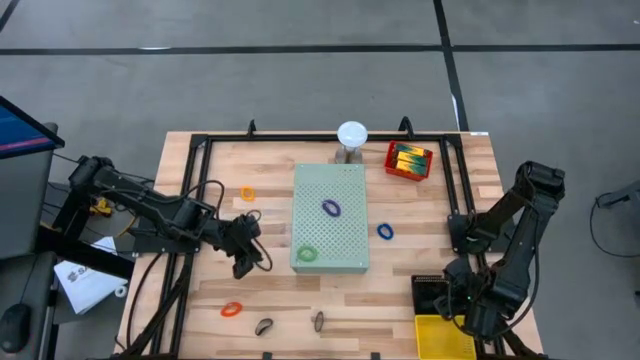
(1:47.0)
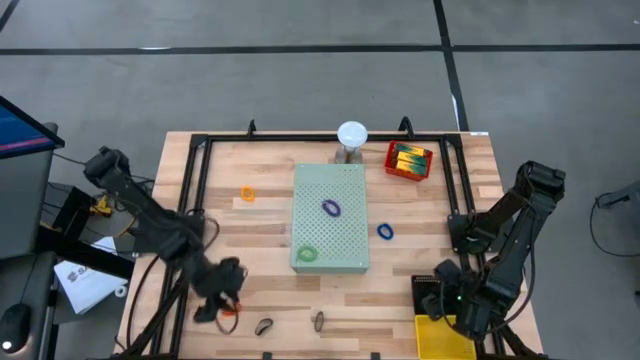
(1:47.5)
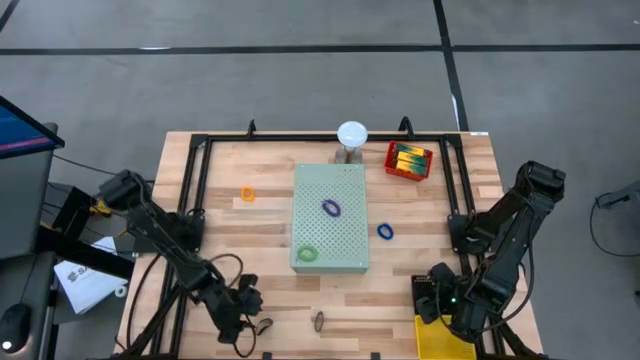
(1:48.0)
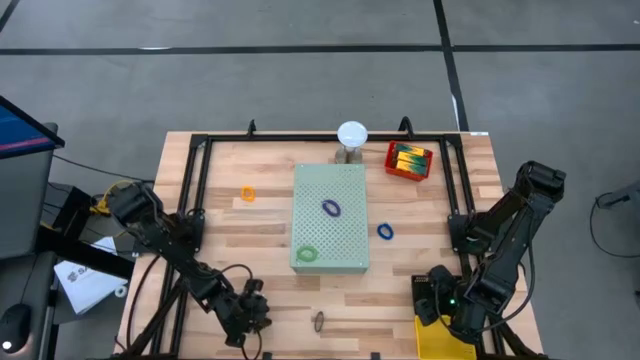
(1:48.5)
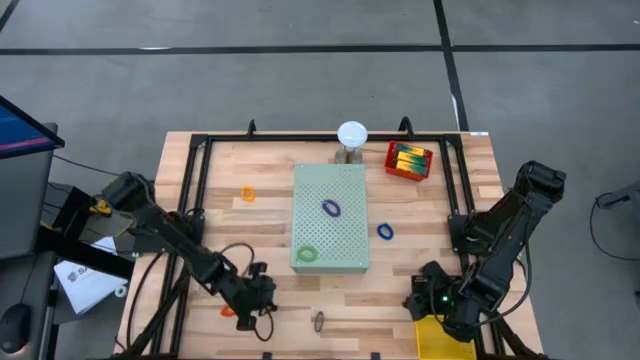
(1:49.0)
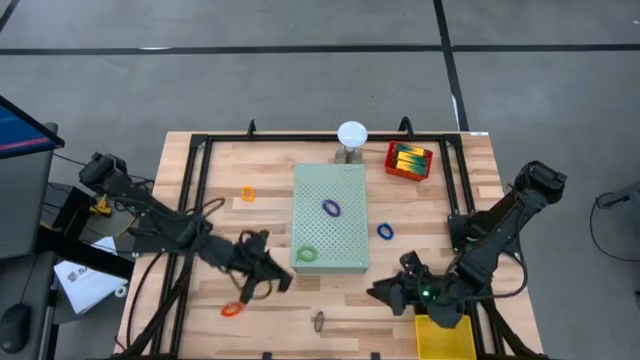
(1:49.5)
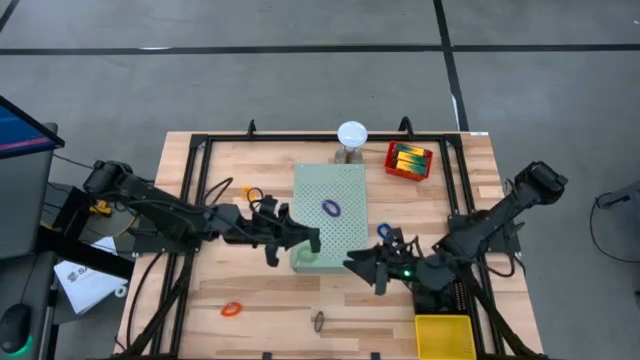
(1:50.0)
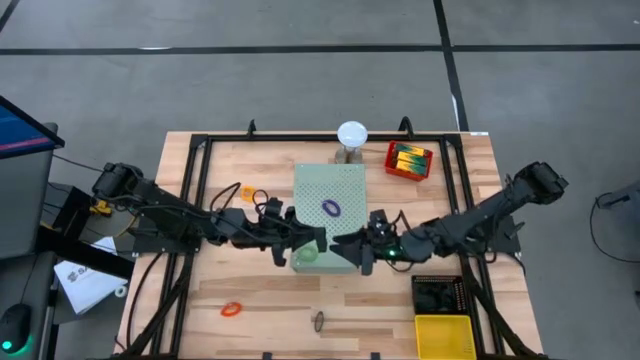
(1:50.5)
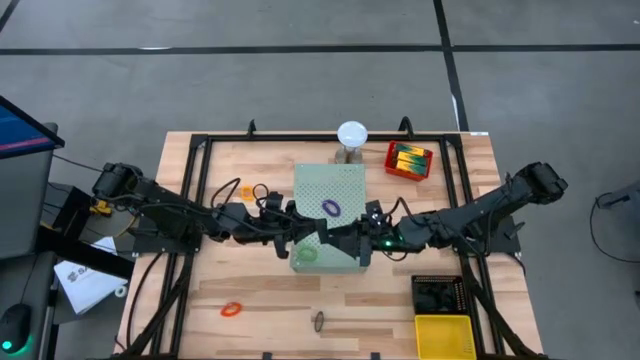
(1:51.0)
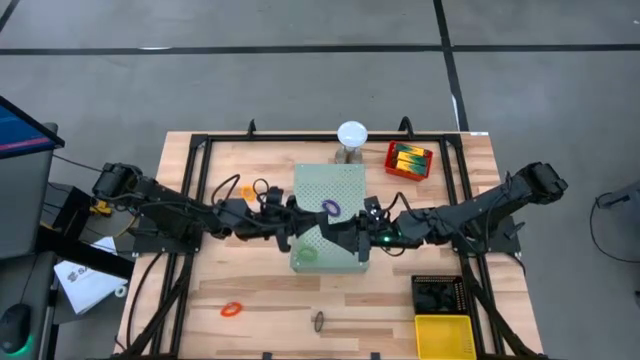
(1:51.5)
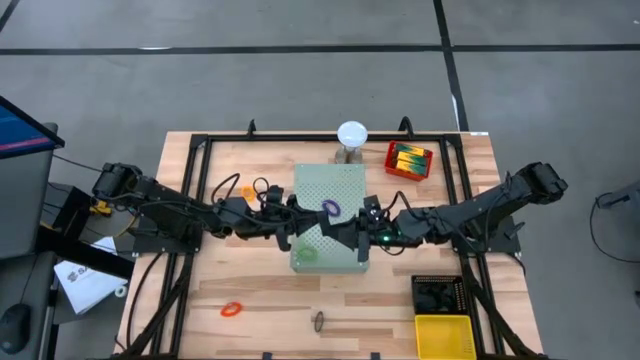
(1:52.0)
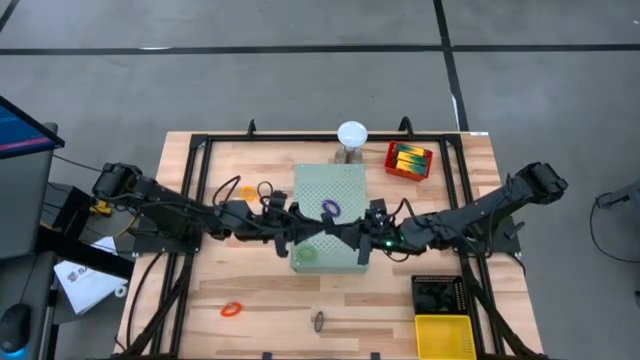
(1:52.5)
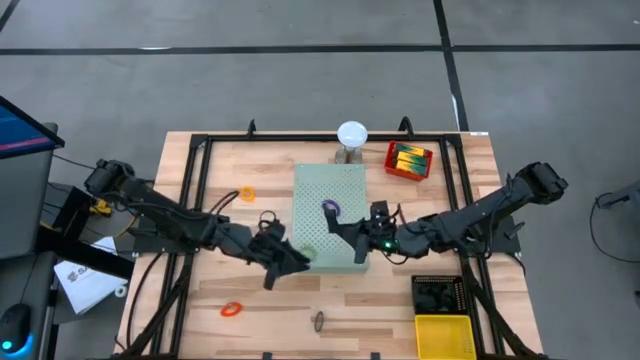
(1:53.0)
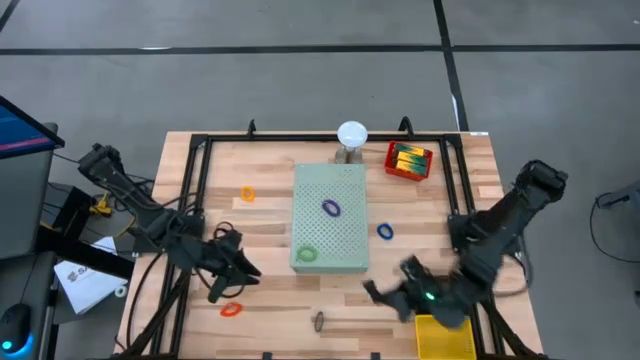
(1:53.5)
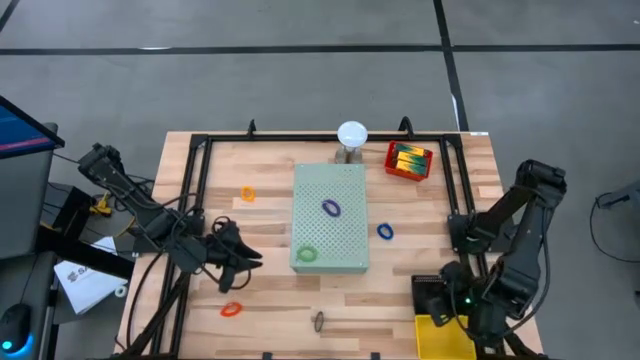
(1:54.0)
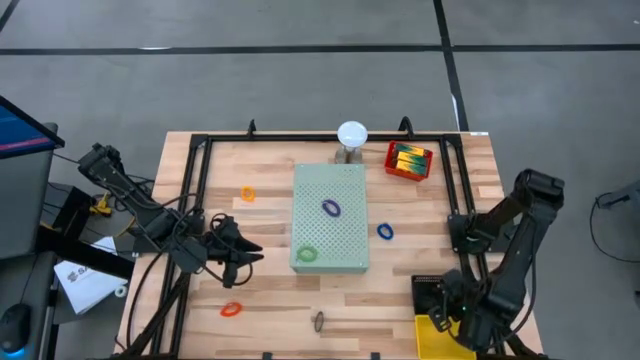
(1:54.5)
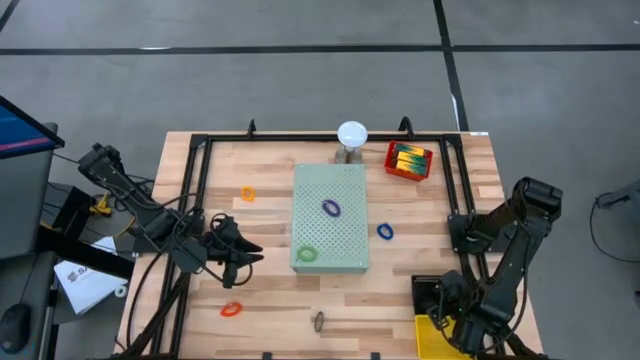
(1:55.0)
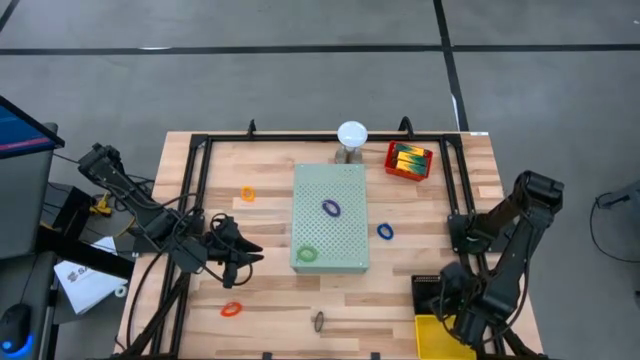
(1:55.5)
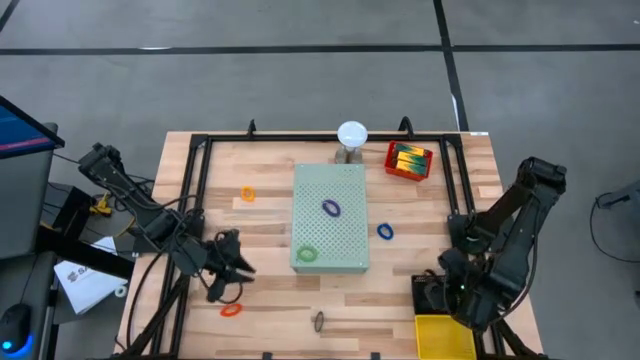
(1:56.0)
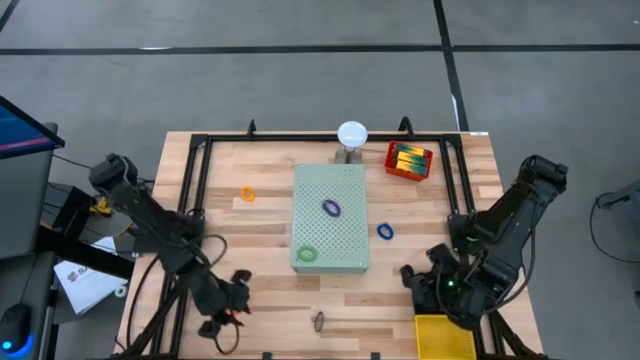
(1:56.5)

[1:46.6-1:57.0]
Task: Pick & Place Office Desk Supplies
Put the black rubberband into the black bin

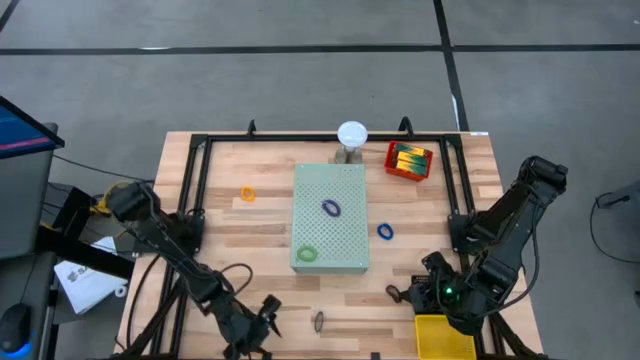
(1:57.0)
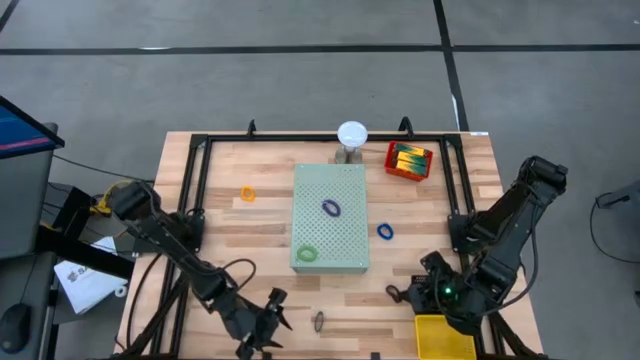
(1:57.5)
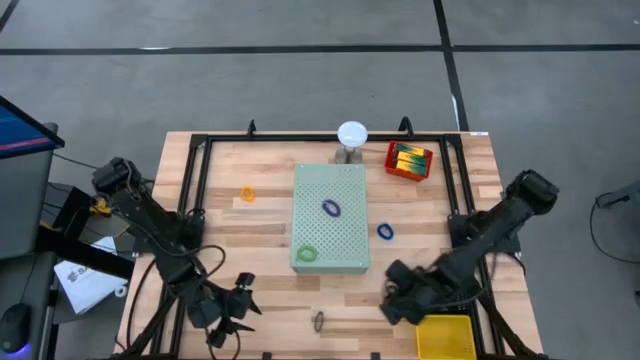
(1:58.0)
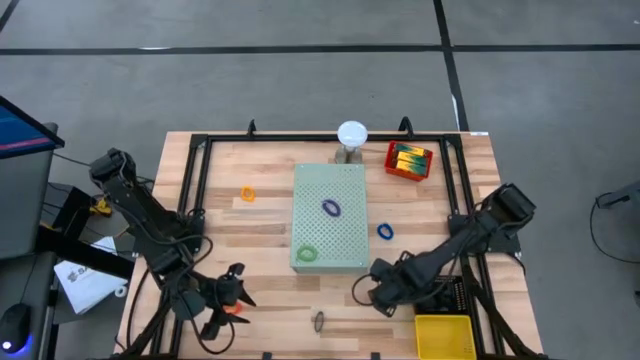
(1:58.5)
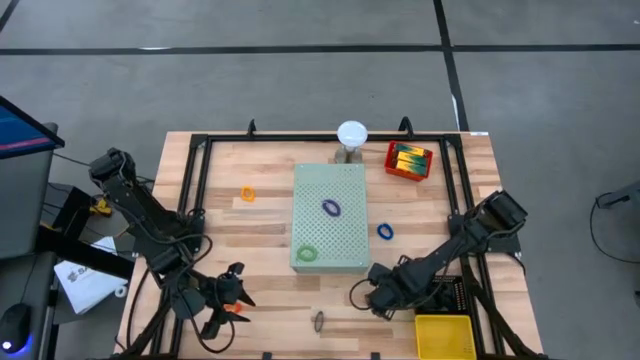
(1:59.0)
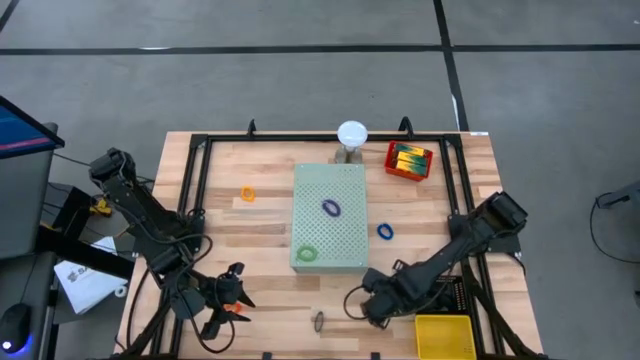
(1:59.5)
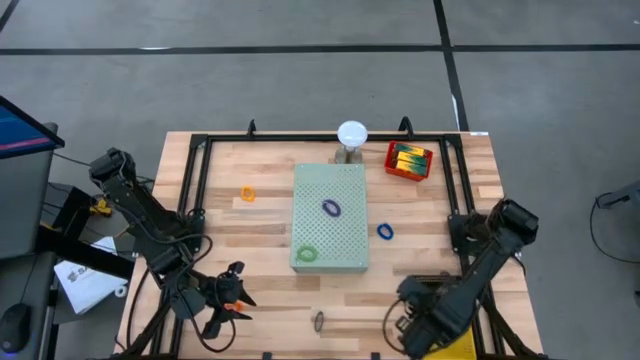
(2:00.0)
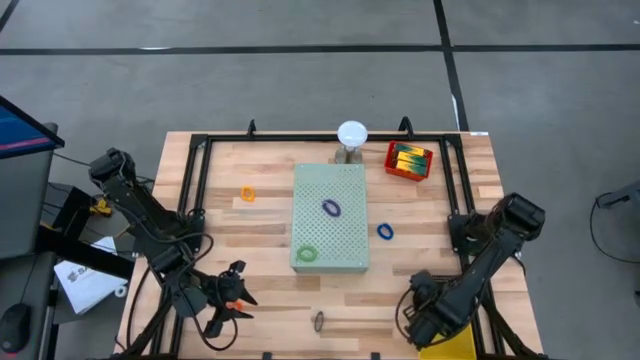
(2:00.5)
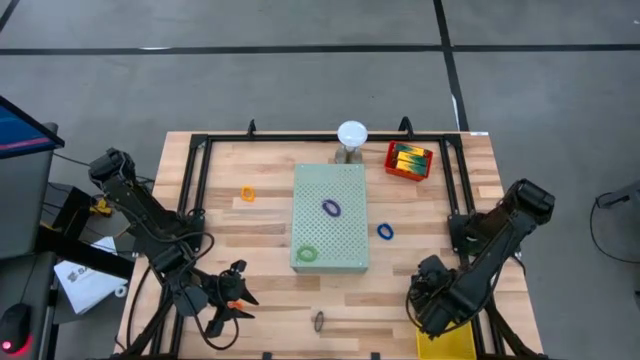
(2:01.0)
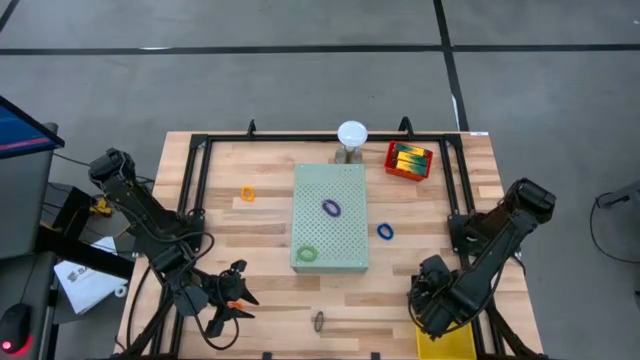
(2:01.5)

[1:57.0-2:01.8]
Put the black rubberband into the black bin

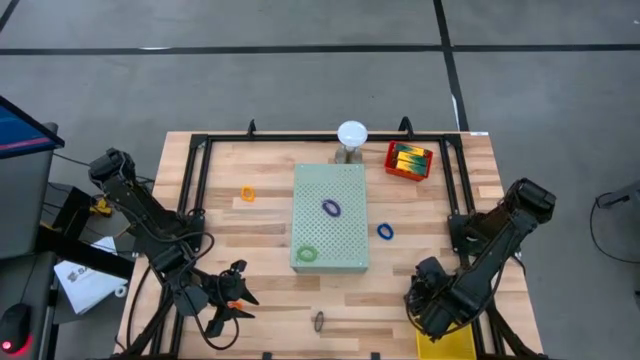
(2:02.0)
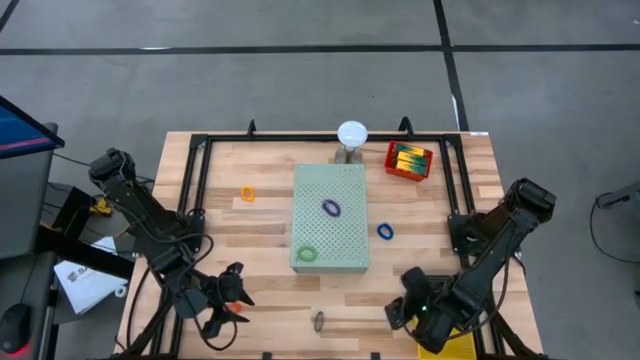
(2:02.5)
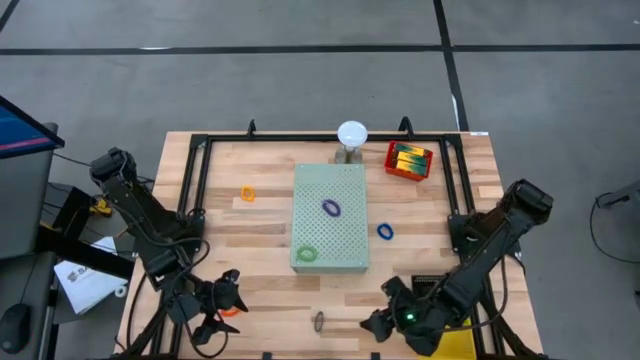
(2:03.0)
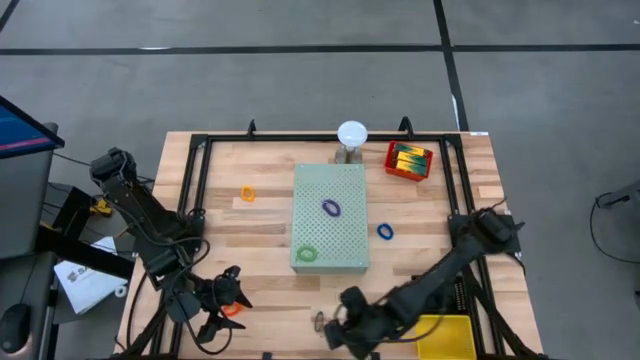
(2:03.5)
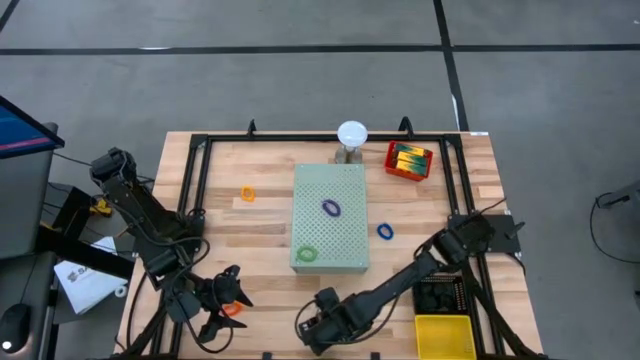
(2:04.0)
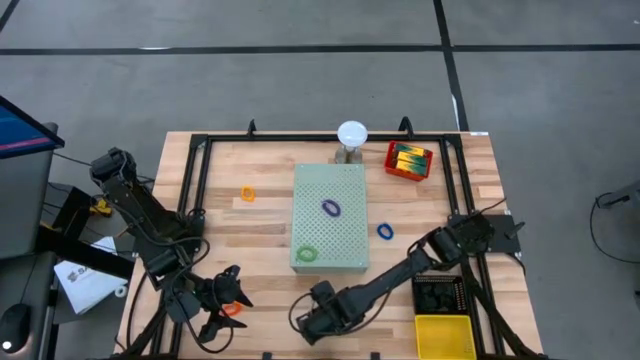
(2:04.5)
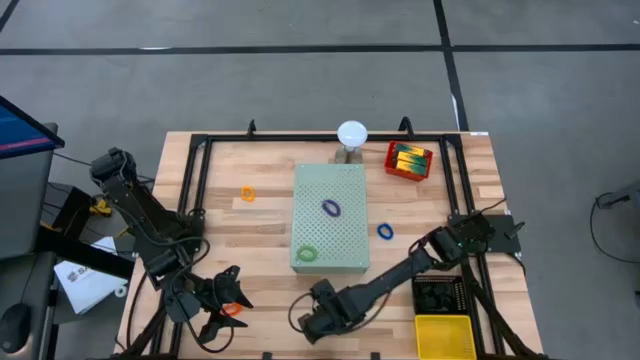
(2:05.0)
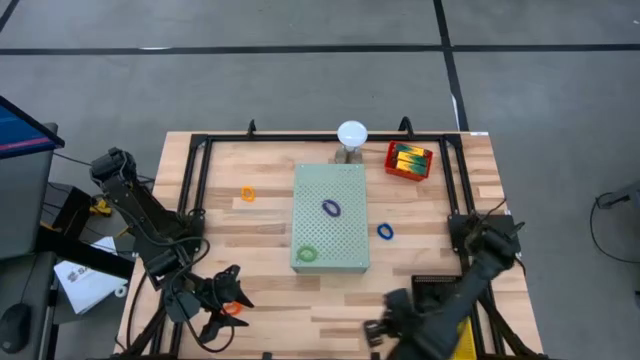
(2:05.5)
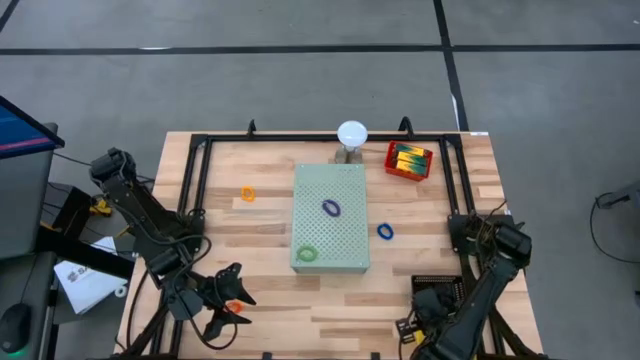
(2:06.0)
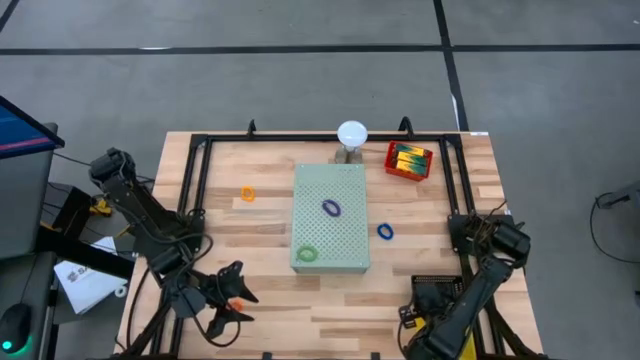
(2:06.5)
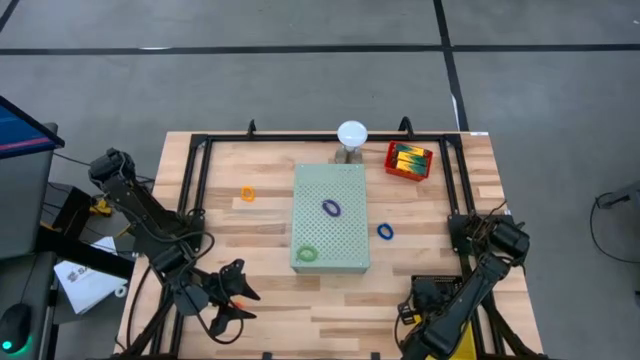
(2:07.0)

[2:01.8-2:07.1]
Put the black rubberband into the black bin
